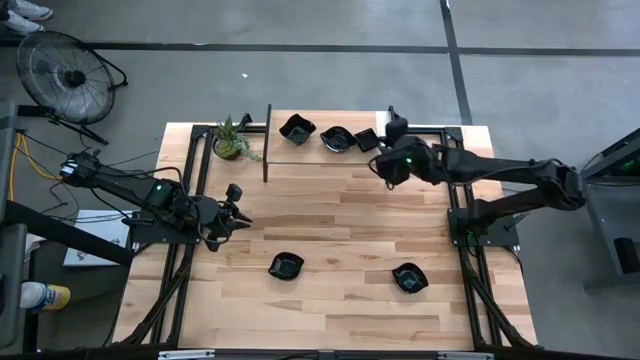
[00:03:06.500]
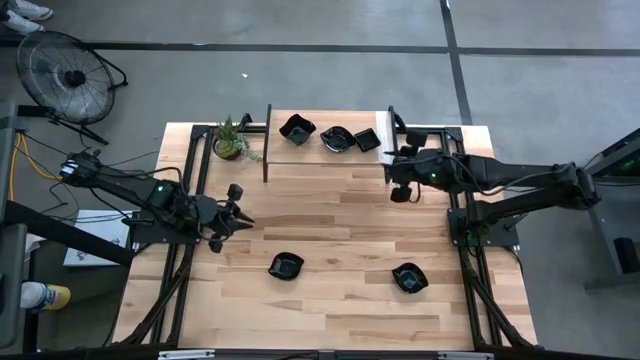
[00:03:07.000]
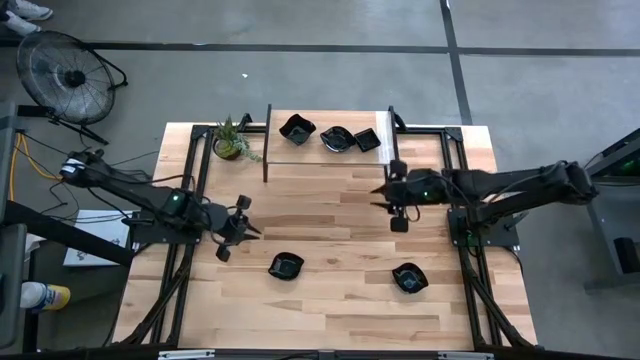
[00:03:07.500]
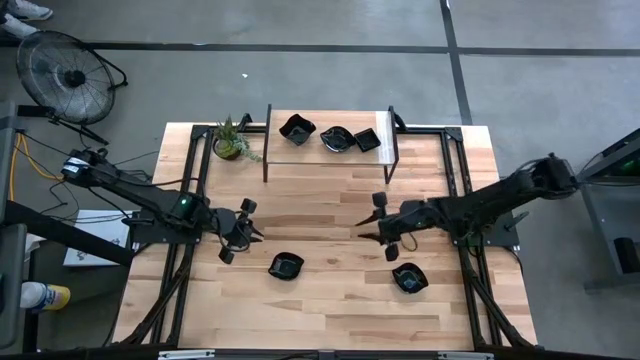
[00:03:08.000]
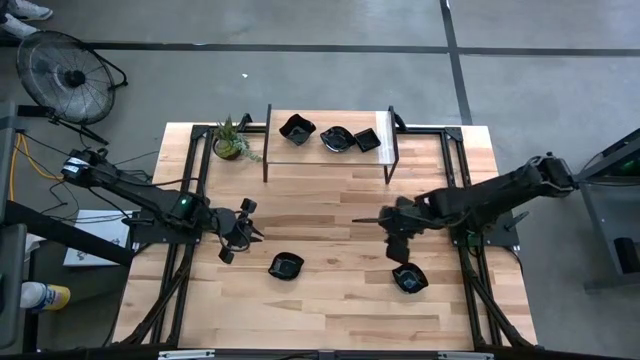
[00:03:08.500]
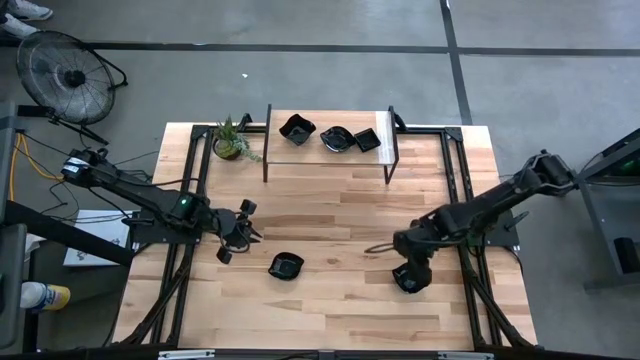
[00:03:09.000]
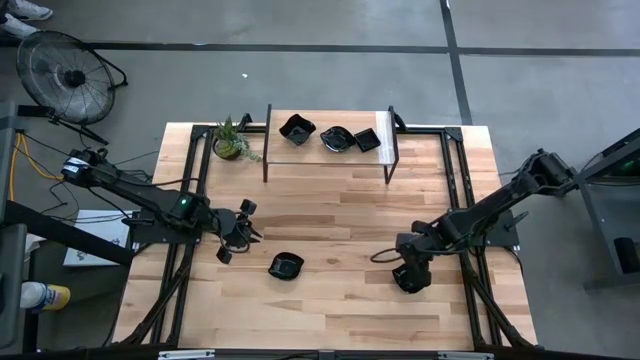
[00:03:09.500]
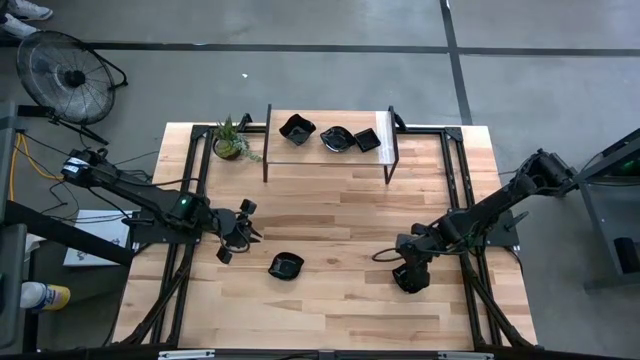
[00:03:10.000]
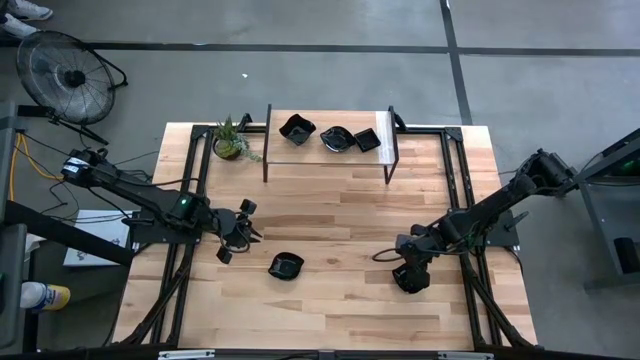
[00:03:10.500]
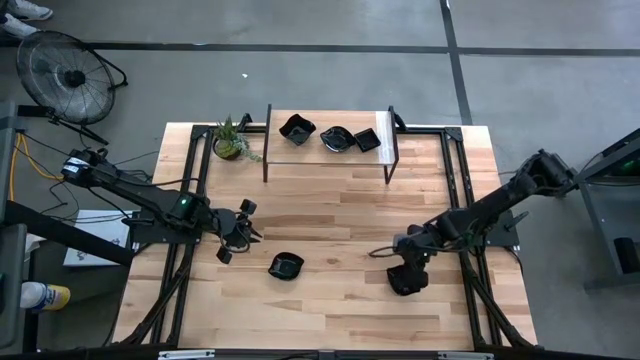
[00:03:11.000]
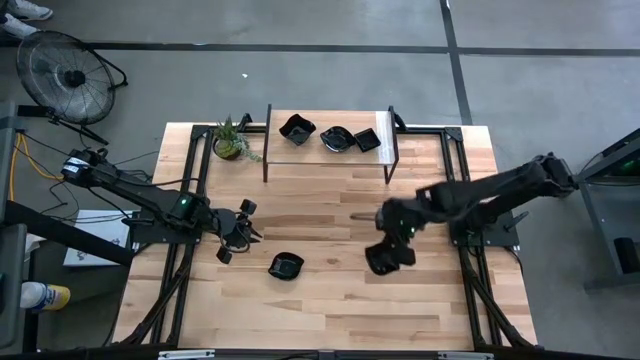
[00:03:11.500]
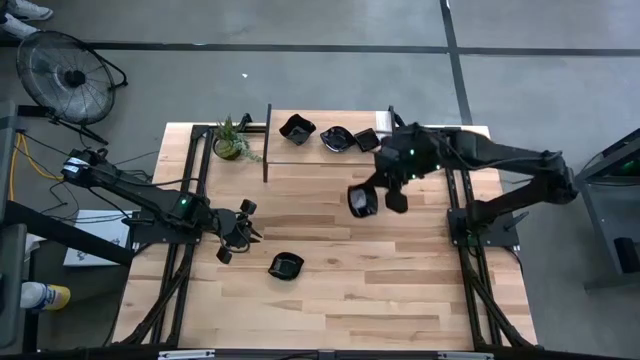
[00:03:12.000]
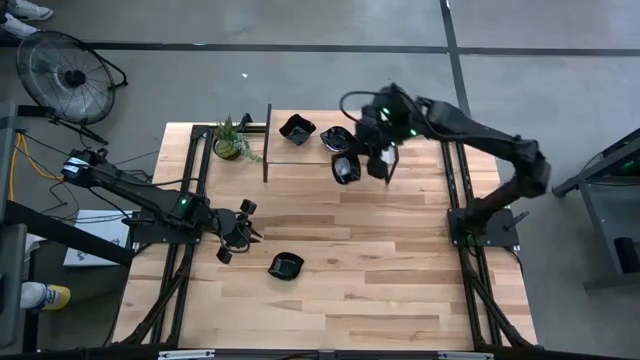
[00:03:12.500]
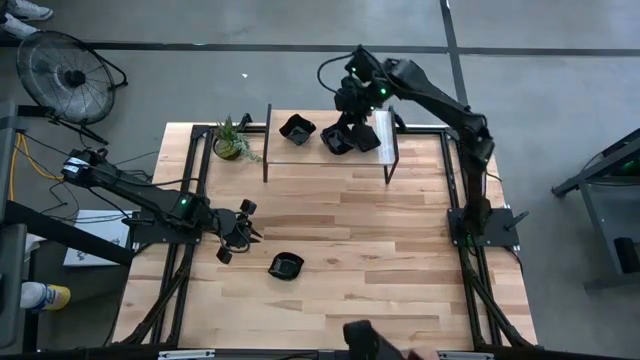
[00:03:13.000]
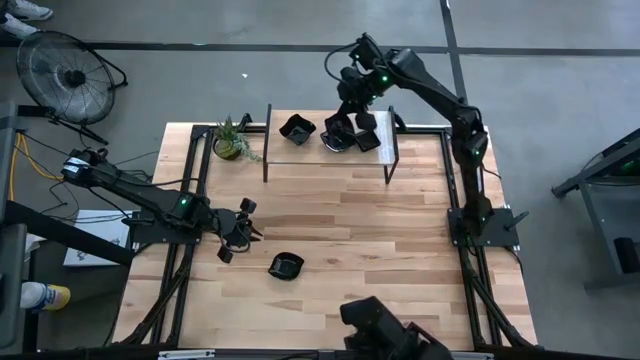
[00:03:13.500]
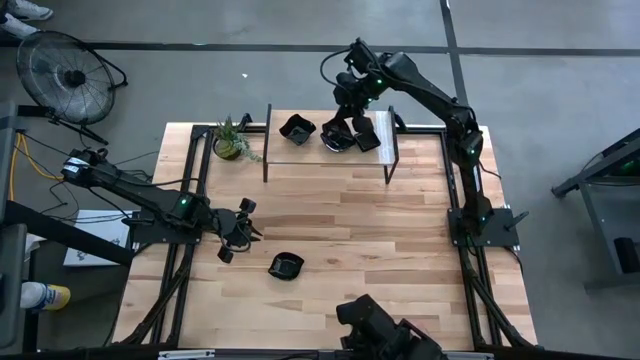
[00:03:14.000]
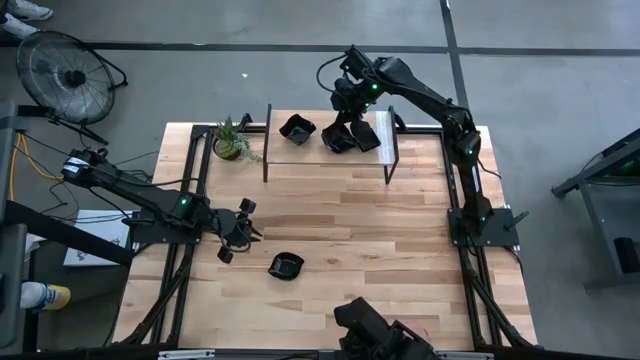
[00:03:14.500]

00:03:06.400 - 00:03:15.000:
Task: Pick & Place Mini shaped plates
Stack the black leaf-shaped plate on top of the black leaf-shaped plate on the shelf

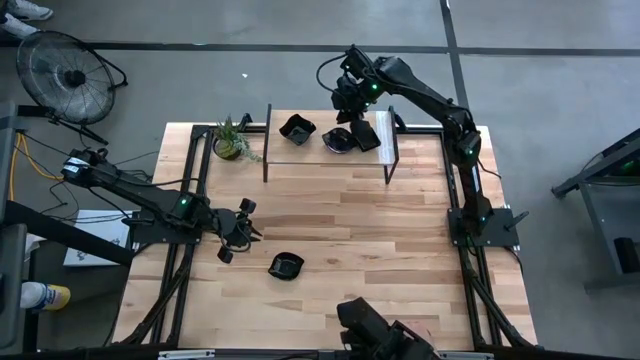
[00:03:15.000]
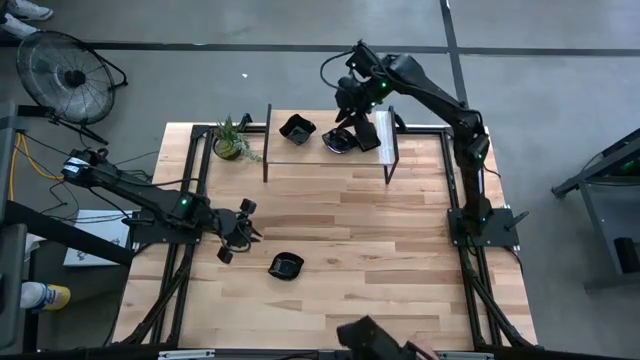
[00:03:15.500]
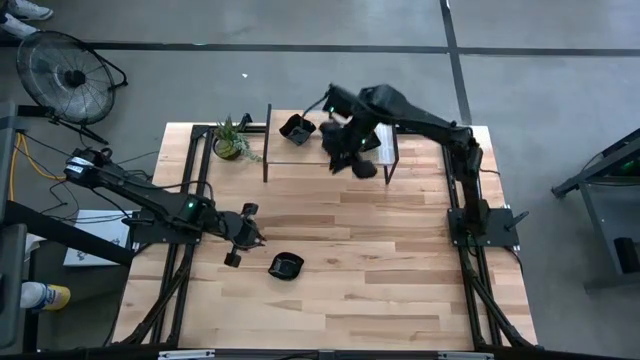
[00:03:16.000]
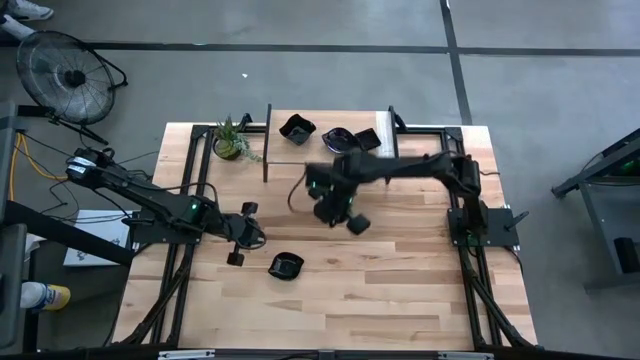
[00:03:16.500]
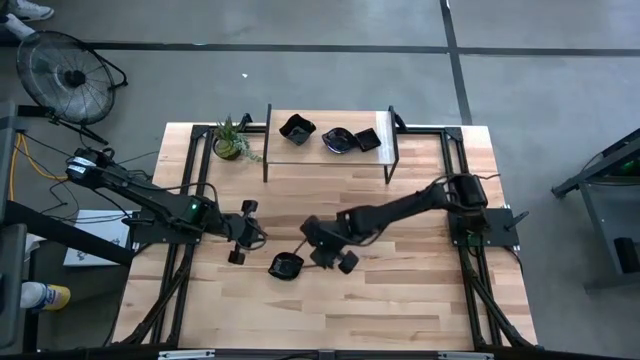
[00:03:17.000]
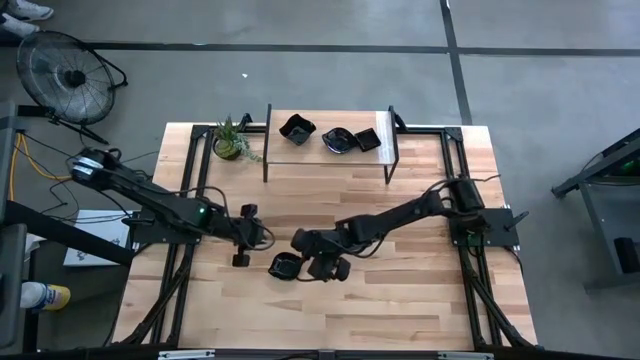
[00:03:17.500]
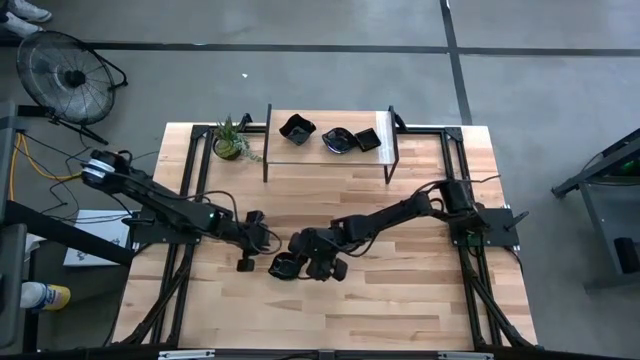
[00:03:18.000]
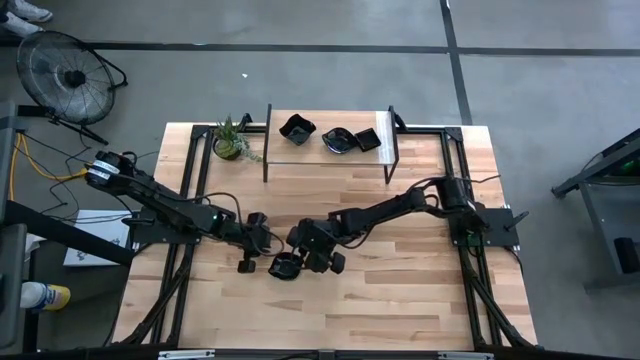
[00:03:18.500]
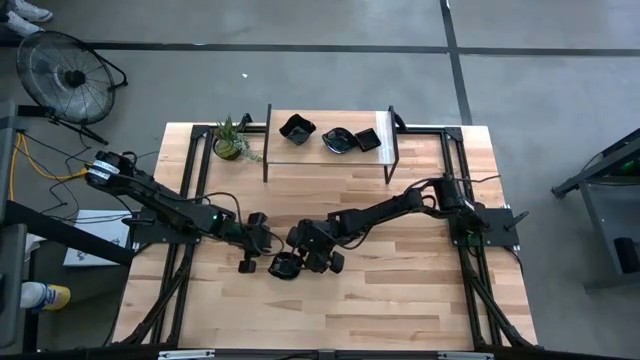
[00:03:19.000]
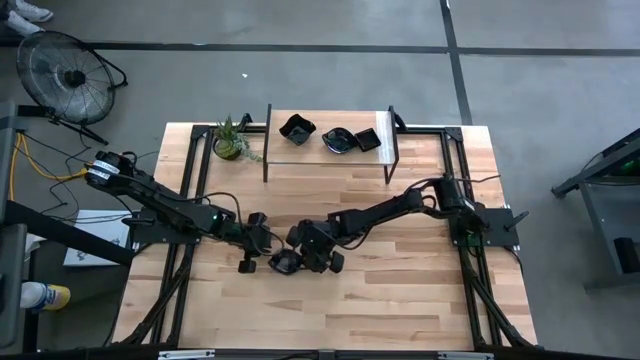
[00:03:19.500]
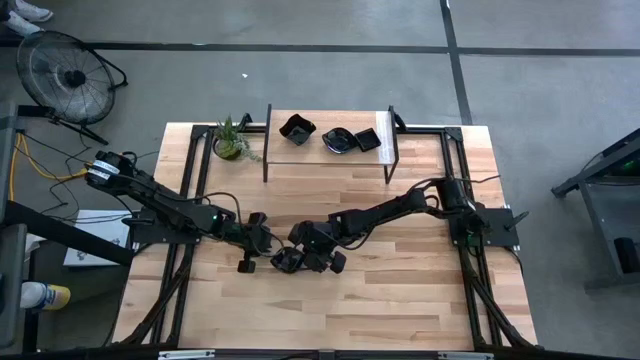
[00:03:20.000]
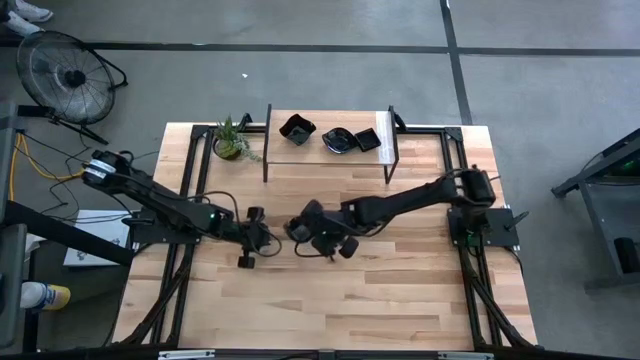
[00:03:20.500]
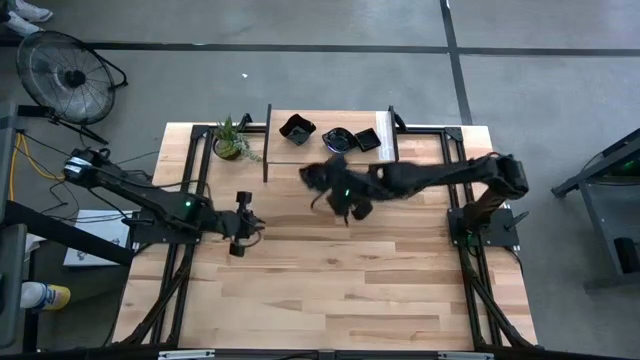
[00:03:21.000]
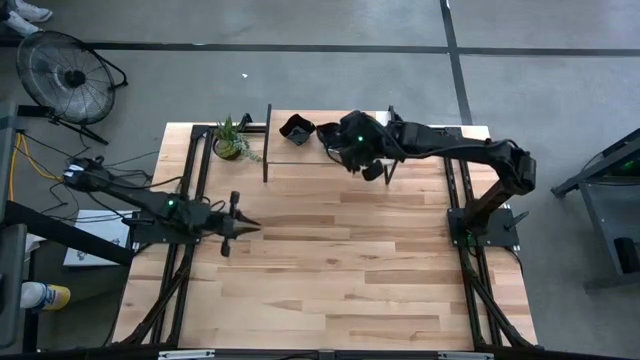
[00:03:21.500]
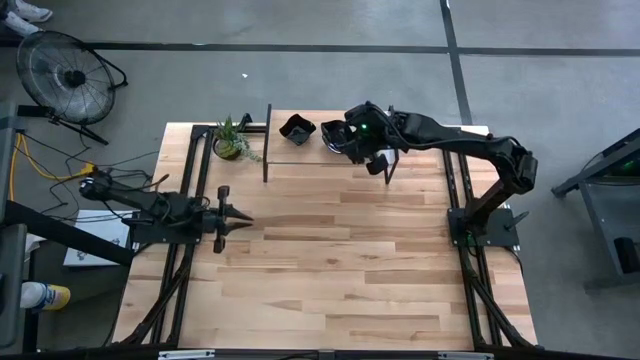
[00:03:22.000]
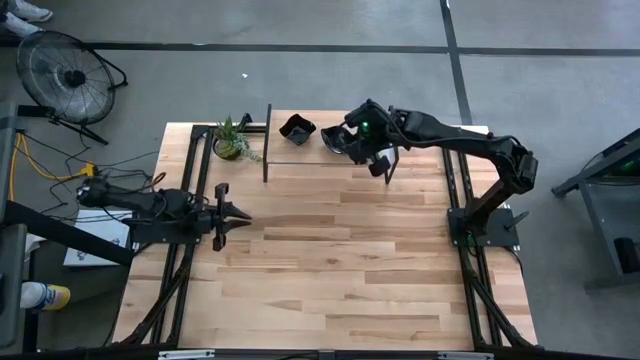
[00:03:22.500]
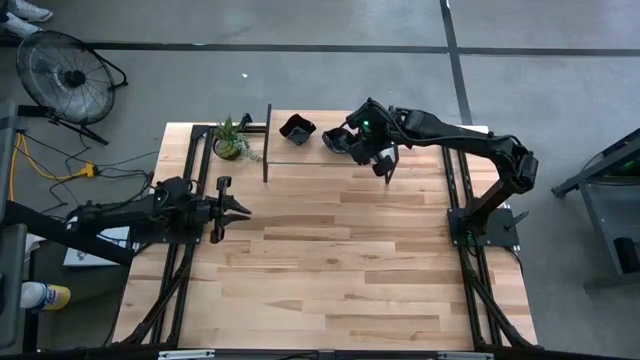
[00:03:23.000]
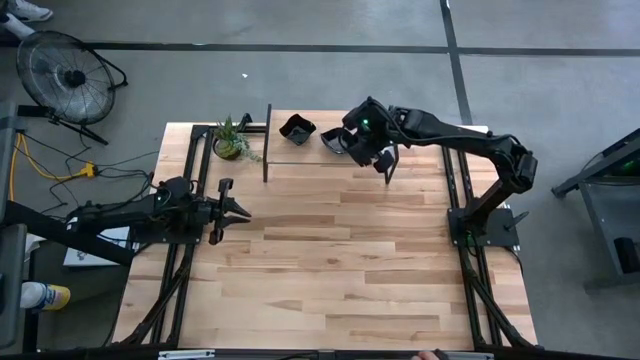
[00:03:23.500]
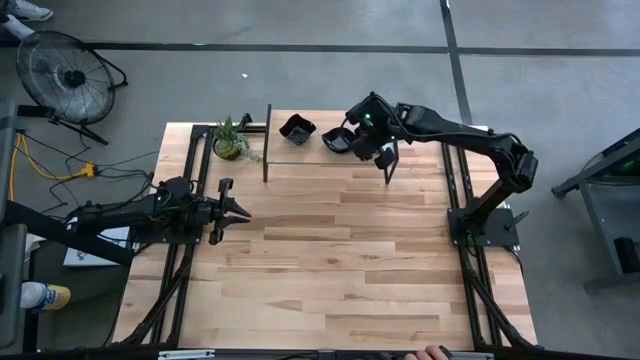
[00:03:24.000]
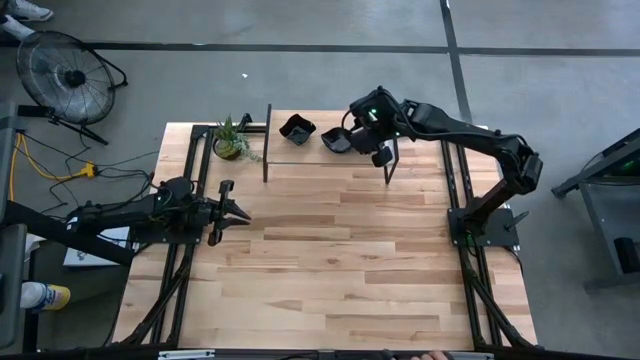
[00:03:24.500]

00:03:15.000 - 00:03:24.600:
Stack the black leaf-shaped plate on top of the black leaf-shaped plate on the shelf

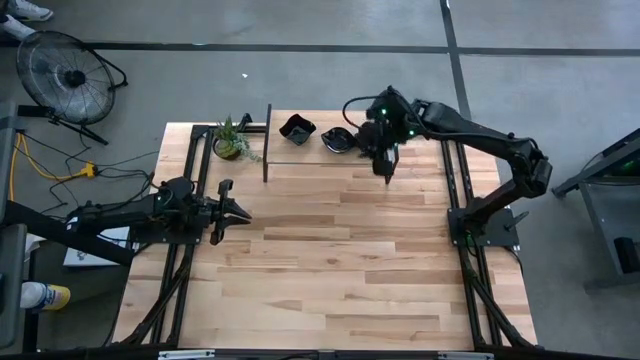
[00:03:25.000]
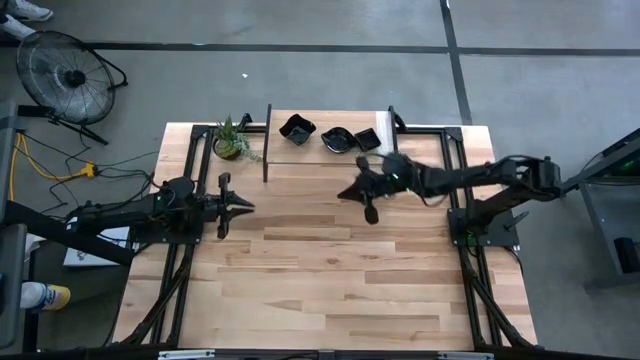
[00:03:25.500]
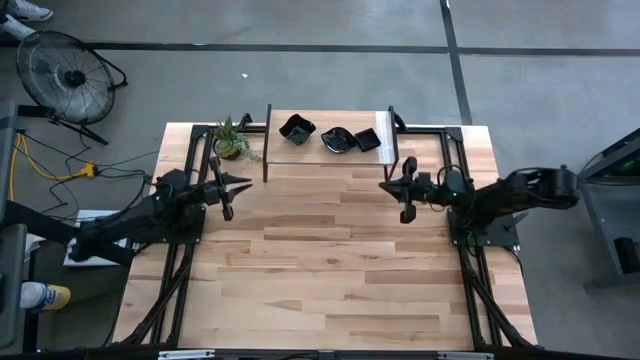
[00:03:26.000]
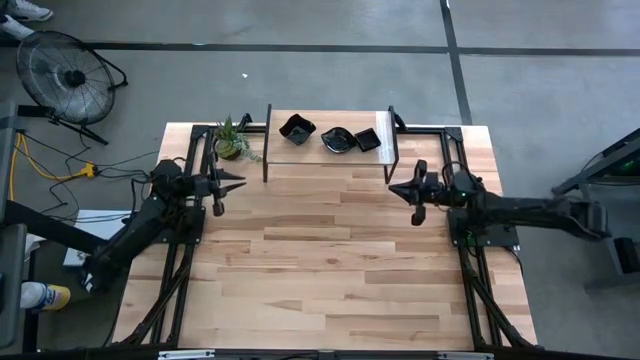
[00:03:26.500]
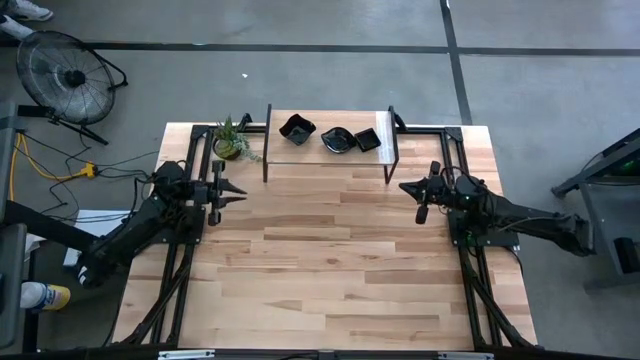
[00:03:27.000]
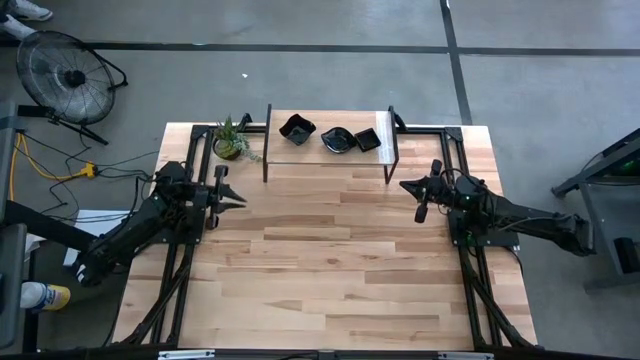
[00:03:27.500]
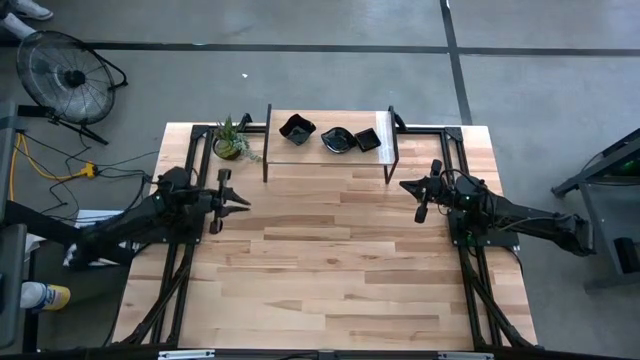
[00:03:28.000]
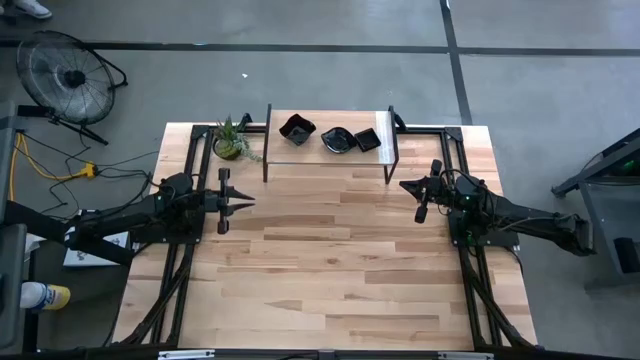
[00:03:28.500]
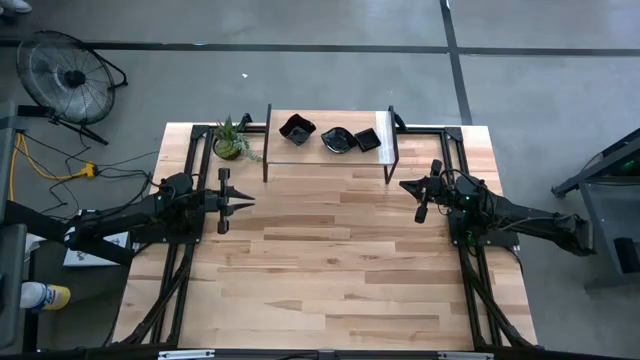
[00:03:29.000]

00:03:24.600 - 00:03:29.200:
Return to Home Position
